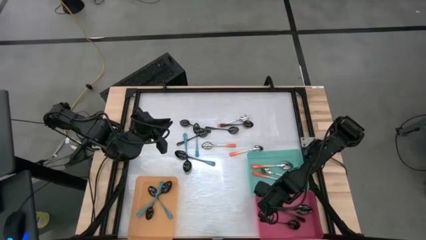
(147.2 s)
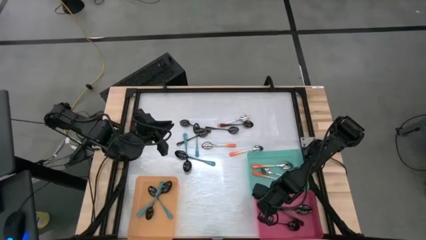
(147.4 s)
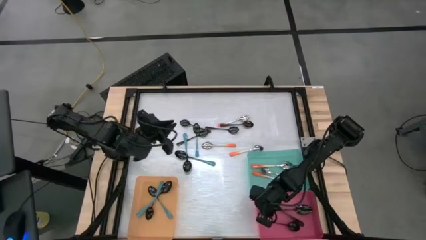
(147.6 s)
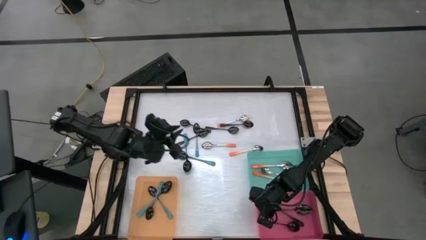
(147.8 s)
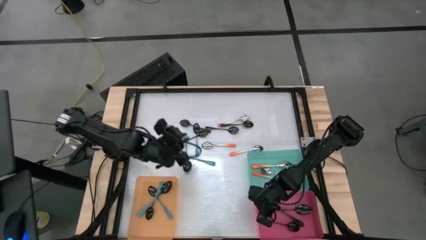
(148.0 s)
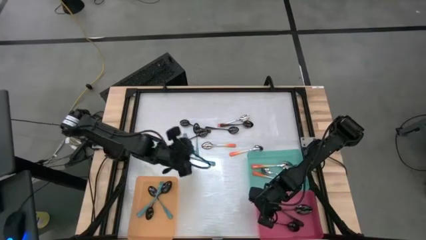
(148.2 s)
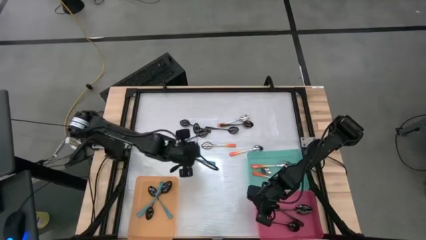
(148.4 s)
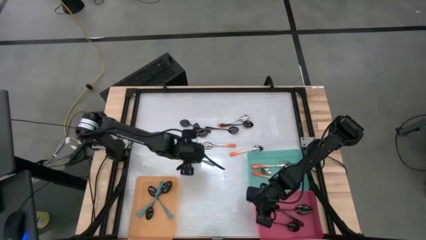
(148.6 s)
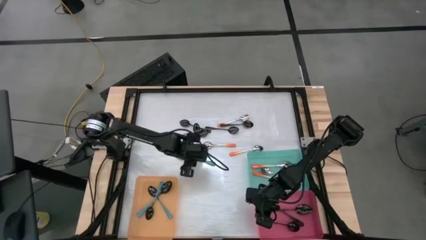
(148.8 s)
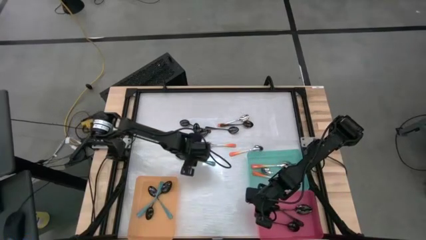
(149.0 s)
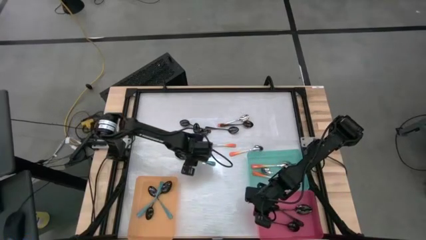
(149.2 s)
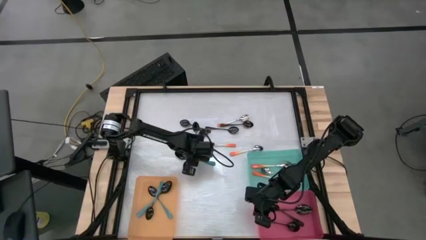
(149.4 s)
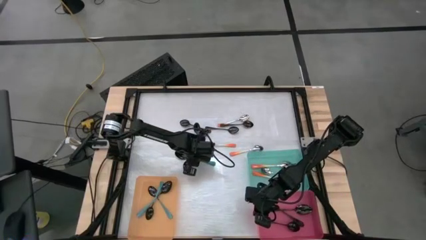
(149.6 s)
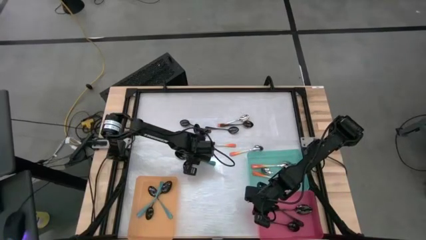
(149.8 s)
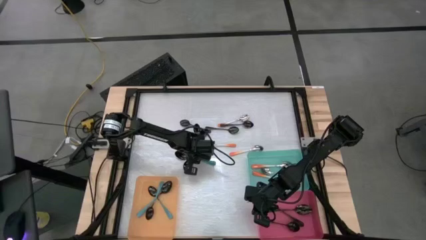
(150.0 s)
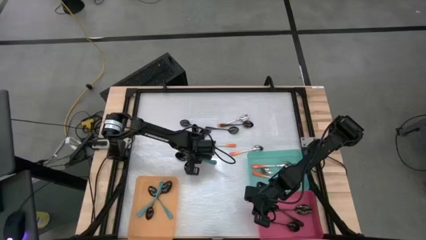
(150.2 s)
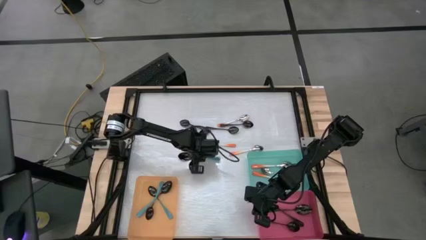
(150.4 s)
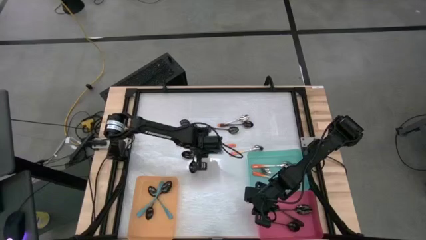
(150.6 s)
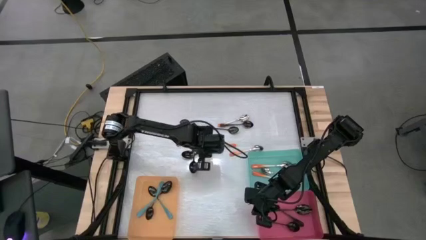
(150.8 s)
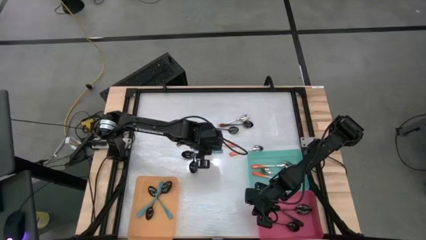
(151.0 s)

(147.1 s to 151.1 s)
Task: Sort silverware by color (type)
Put the blue spoon into the orange bin

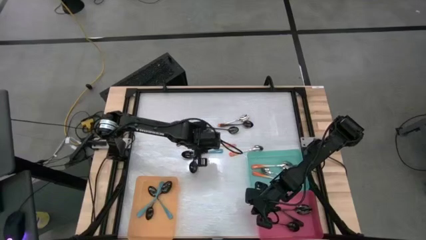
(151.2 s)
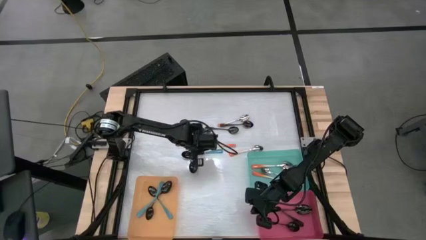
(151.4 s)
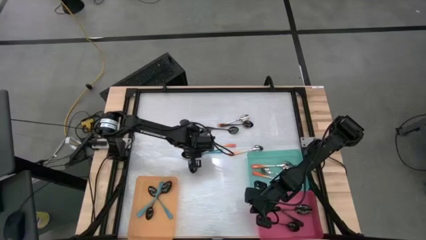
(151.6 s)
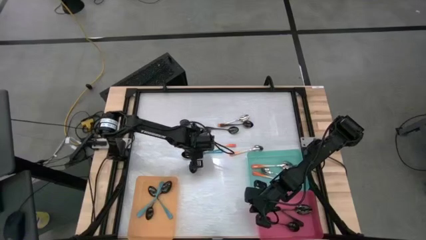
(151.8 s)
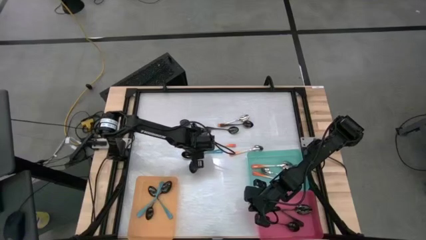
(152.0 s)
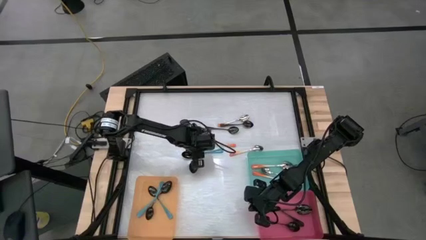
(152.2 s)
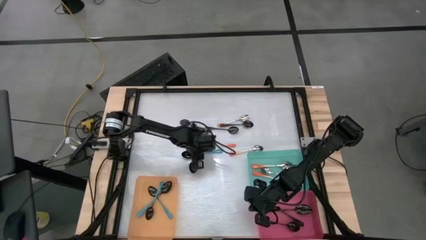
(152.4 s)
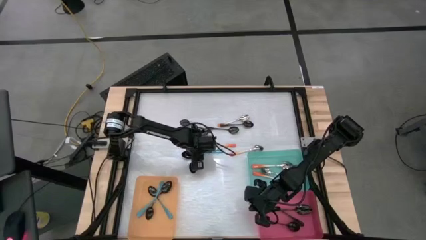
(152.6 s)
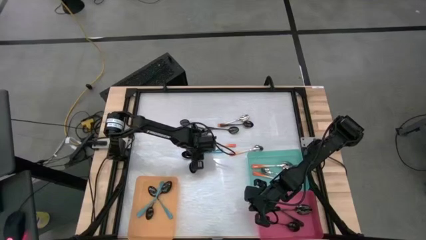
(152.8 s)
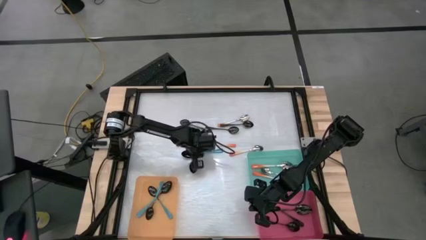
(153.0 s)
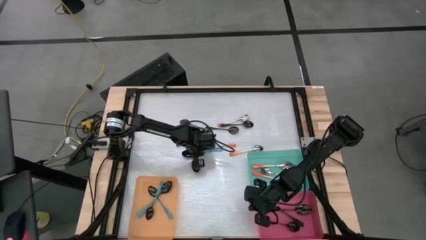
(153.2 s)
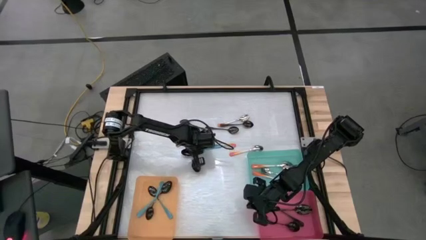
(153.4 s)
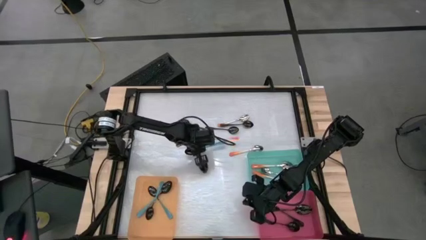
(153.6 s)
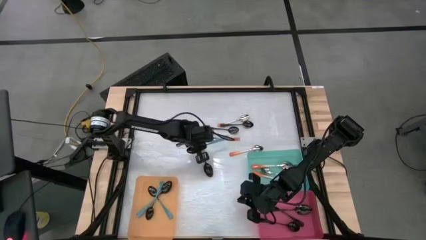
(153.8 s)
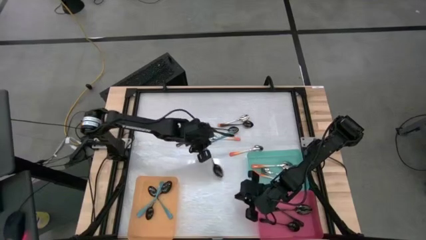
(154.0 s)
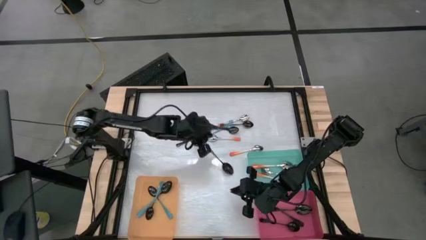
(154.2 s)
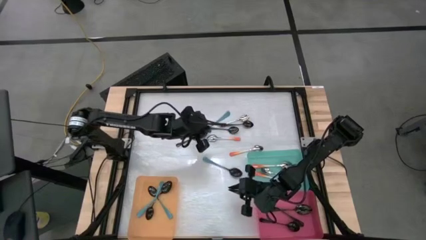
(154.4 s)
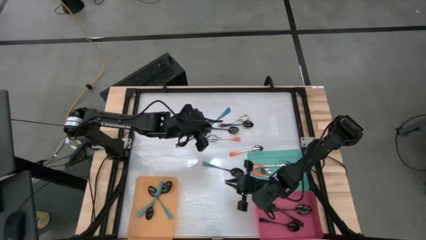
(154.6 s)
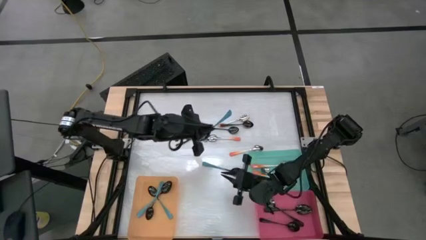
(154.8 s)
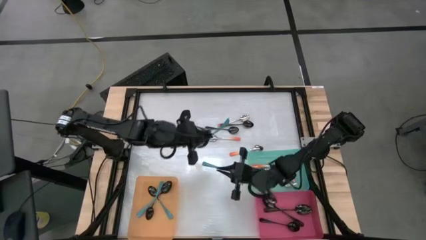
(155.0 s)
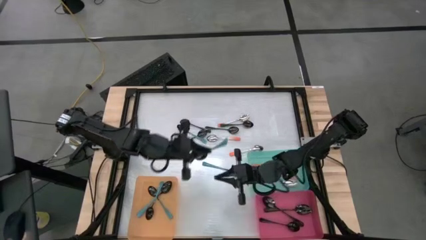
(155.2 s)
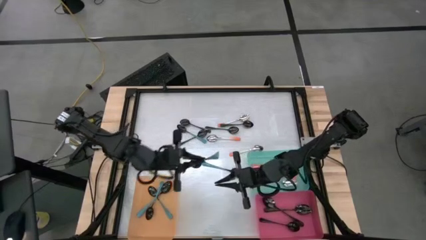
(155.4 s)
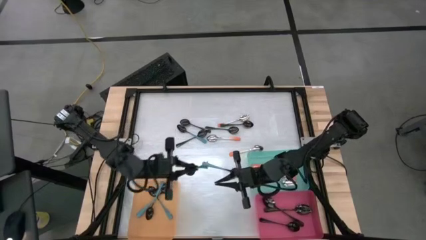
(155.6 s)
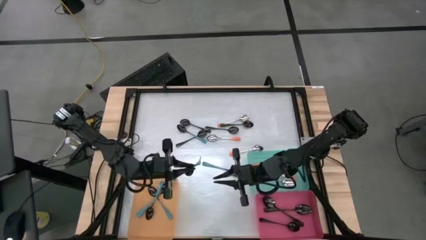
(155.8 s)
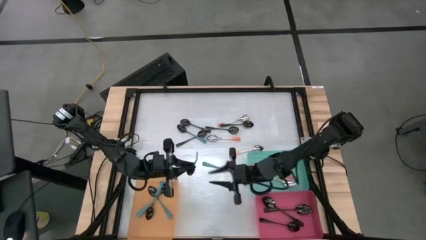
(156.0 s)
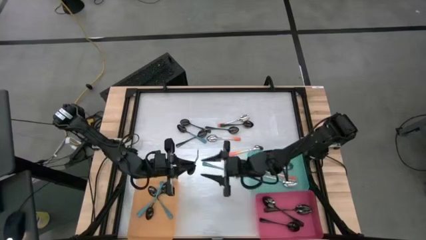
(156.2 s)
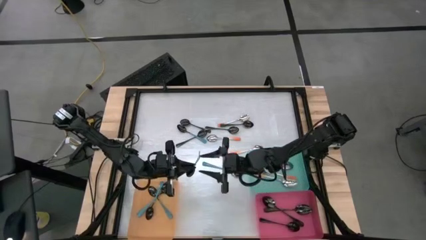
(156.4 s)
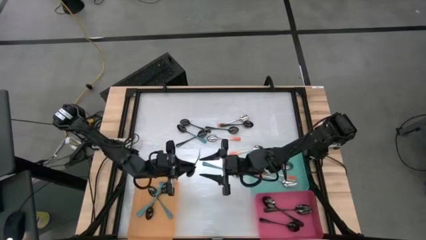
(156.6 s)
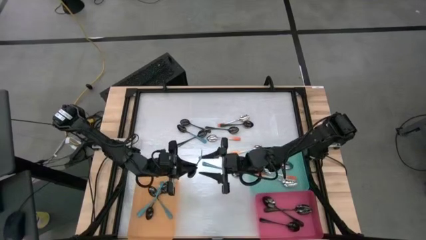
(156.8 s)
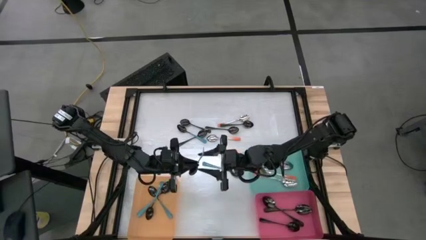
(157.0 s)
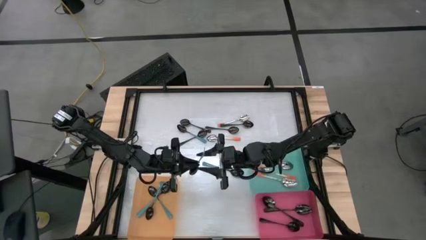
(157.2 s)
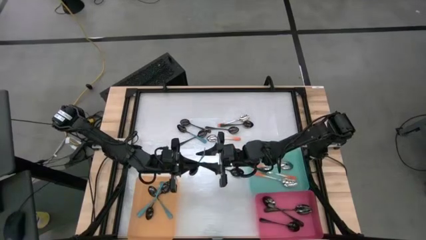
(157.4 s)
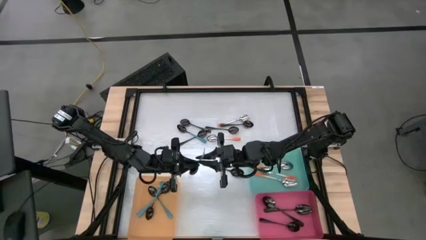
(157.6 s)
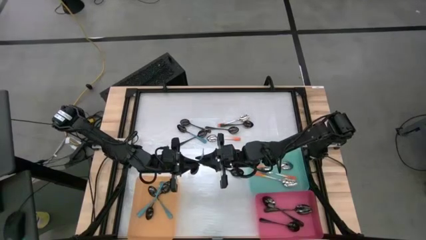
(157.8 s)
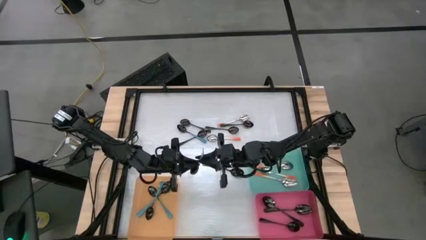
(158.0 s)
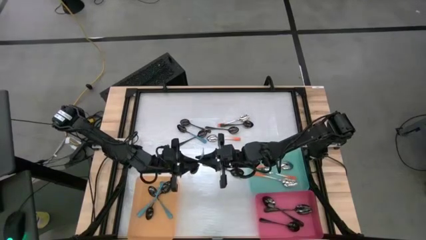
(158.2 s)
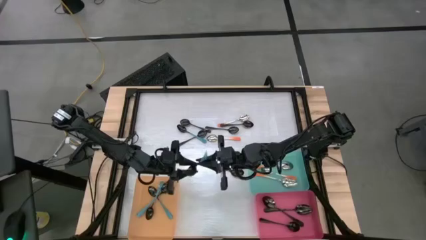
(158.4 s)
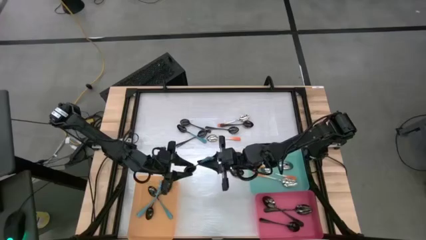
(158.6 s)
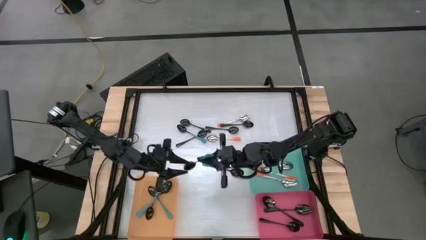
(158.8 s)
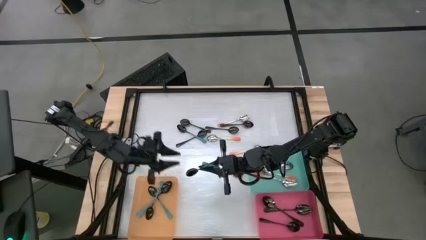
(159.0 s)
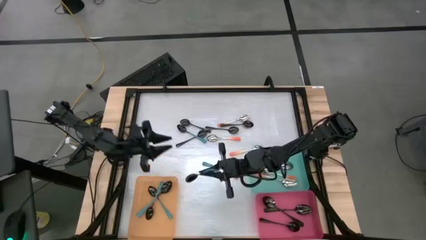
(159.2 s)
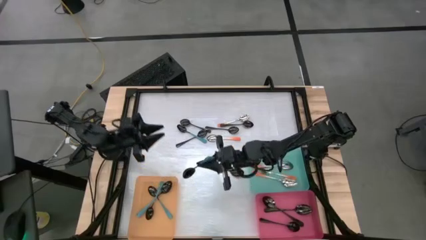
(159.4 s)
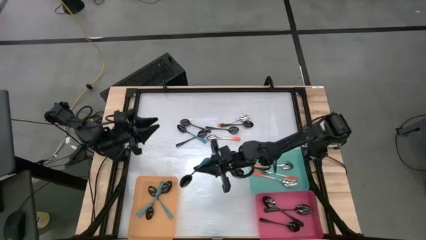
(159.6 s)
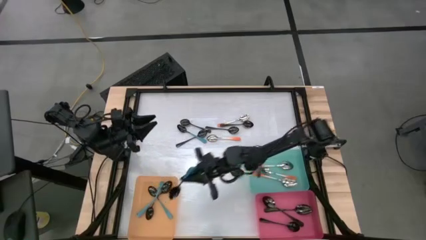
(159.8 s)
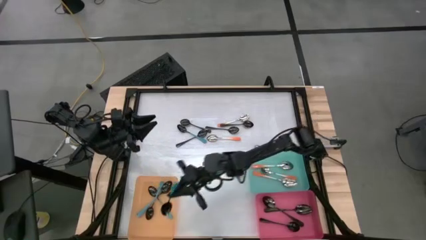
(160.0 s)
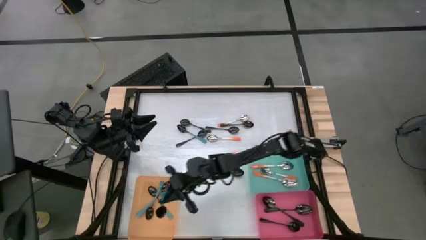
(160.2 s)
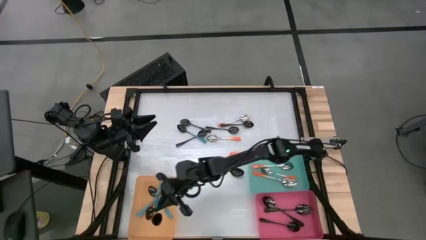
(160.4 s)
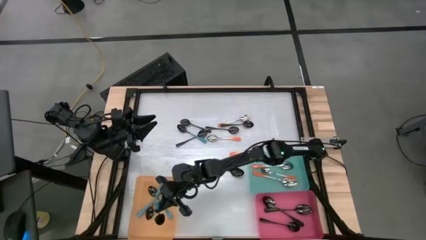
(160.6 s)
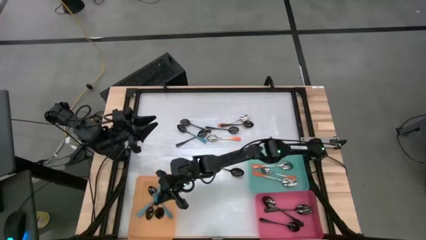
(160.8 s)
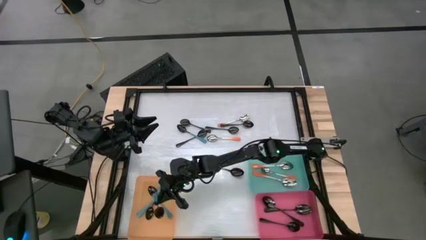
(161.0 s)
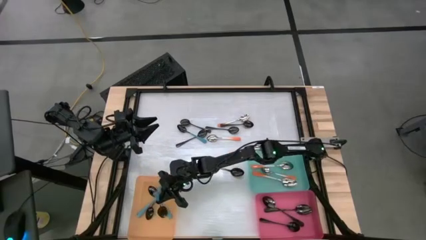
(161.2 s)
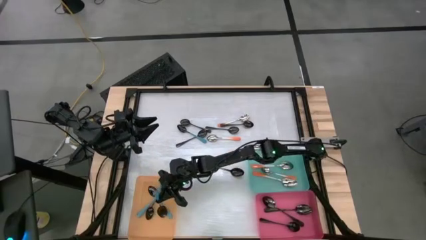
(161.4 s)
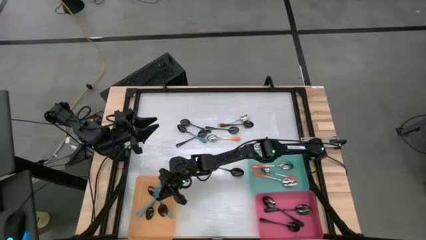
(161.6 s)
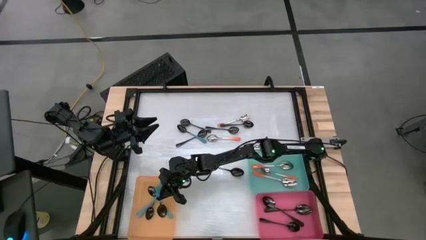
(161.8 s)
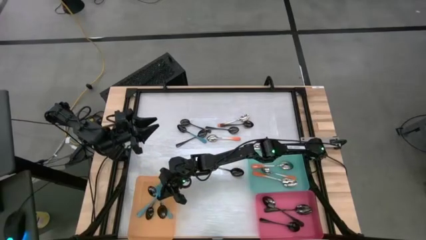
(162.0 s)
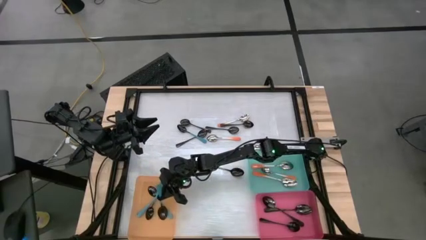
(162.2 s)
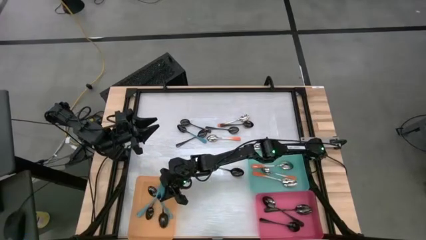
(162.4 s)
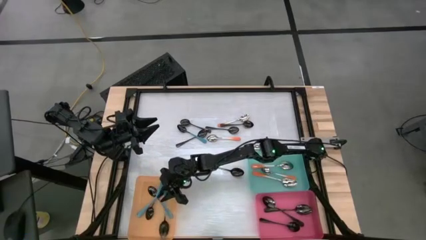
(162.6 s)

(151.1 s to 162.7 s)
Put the blue spoon into the orange bin
